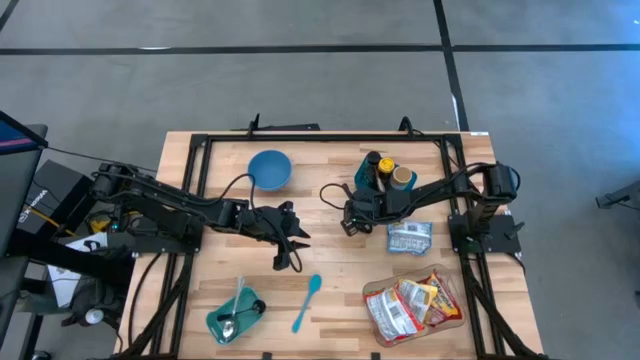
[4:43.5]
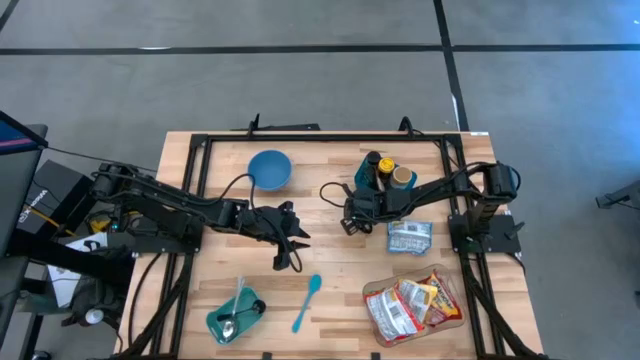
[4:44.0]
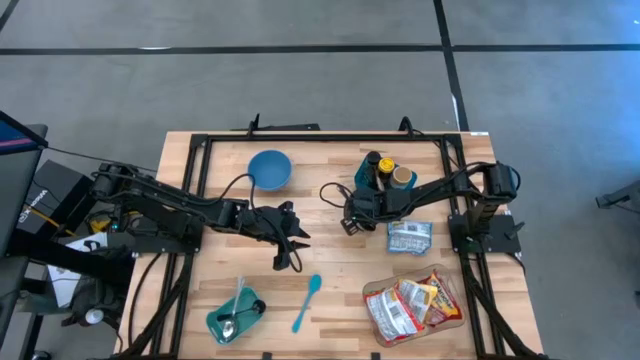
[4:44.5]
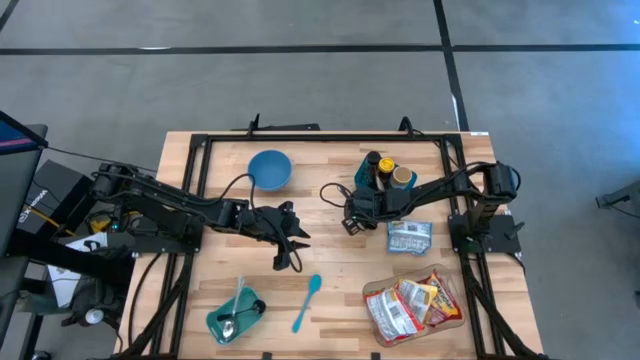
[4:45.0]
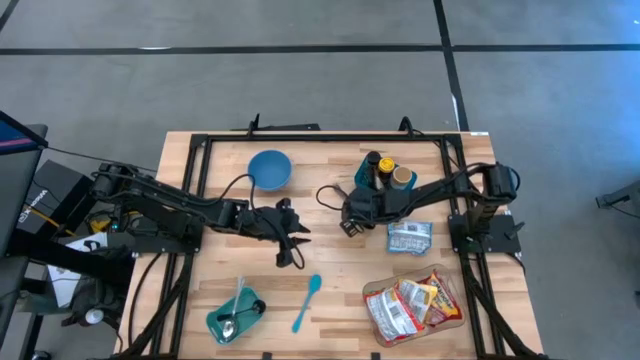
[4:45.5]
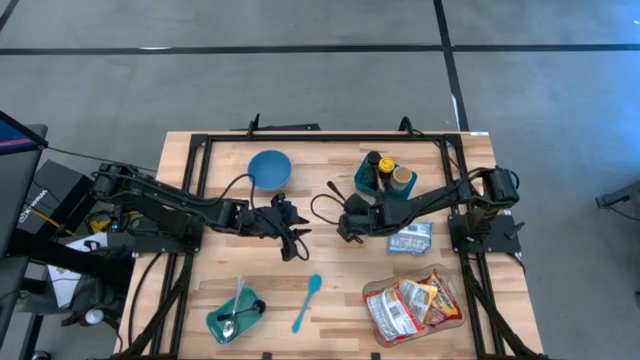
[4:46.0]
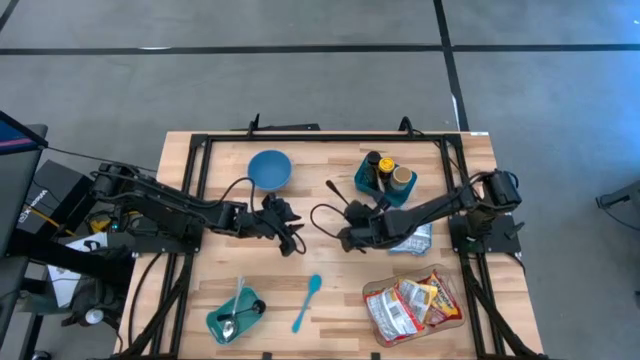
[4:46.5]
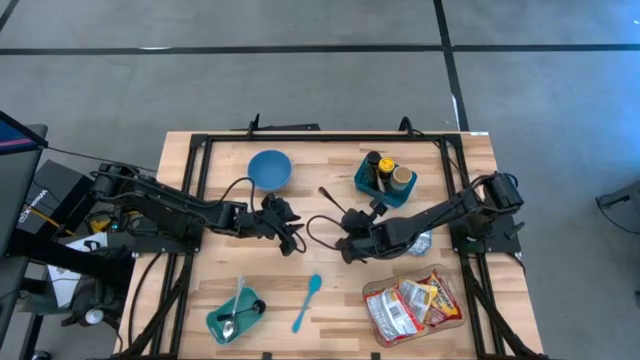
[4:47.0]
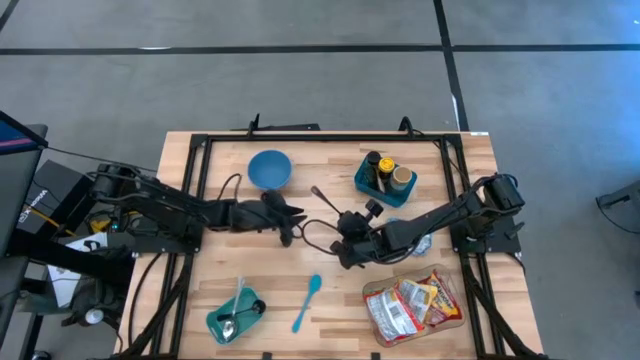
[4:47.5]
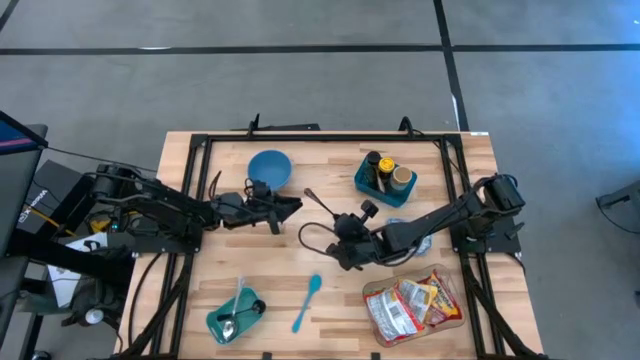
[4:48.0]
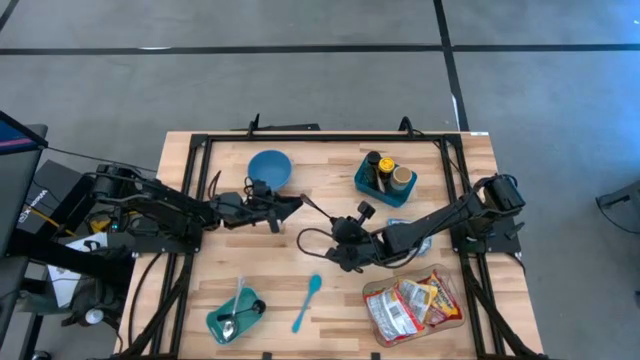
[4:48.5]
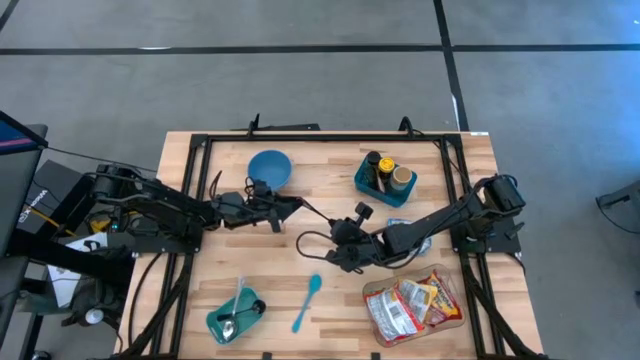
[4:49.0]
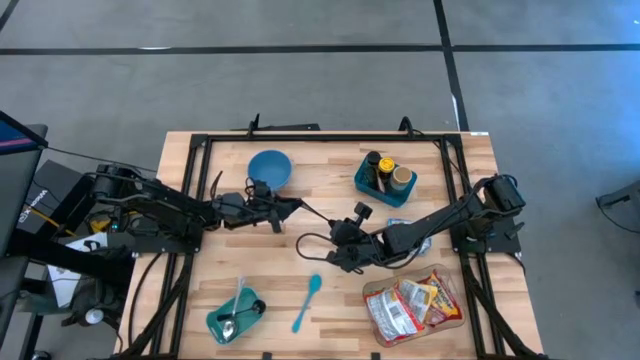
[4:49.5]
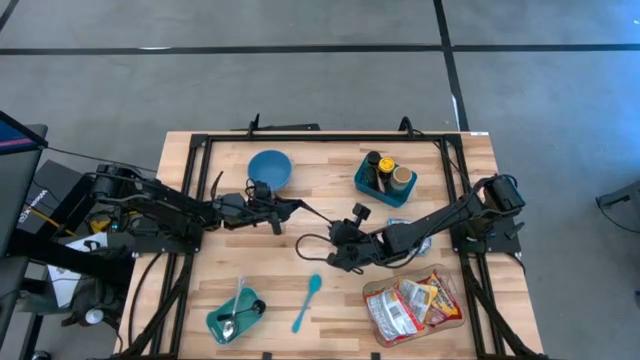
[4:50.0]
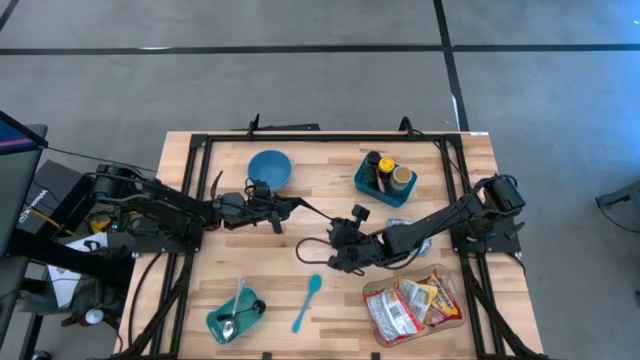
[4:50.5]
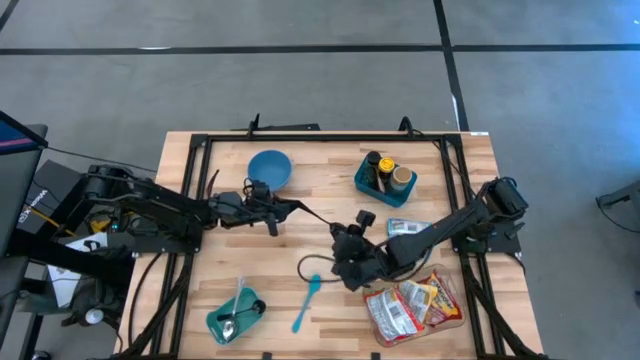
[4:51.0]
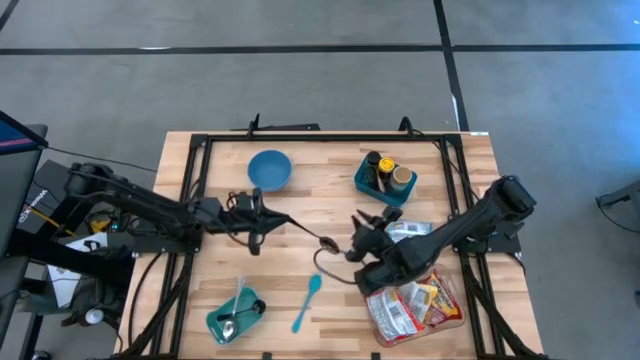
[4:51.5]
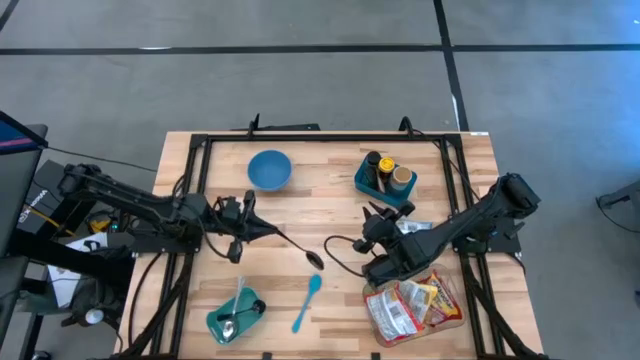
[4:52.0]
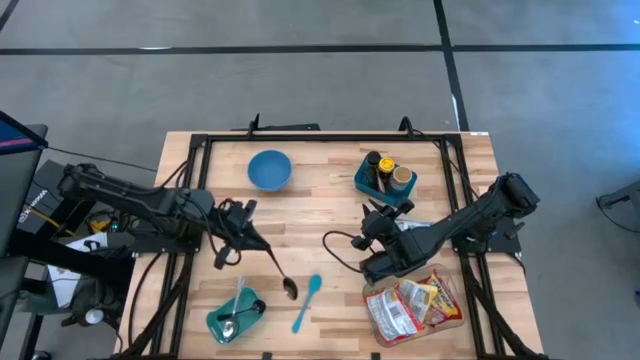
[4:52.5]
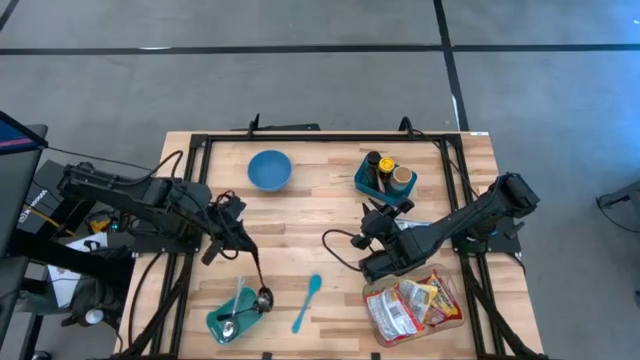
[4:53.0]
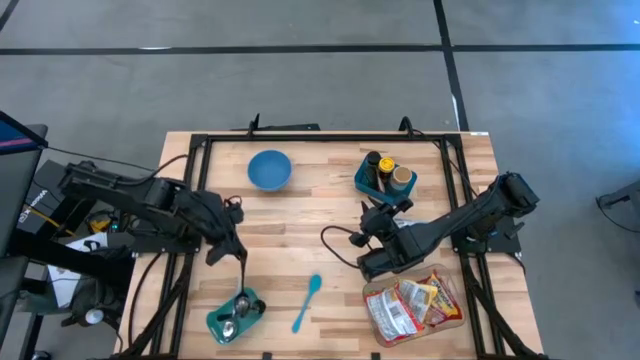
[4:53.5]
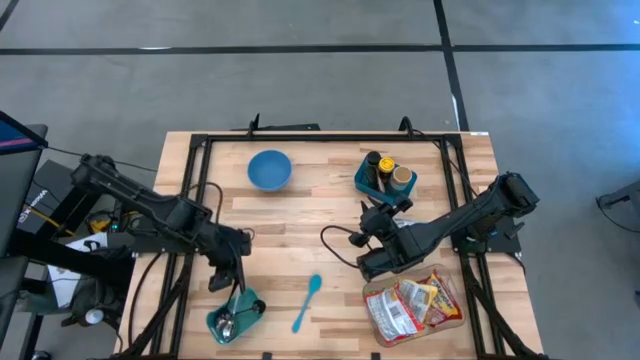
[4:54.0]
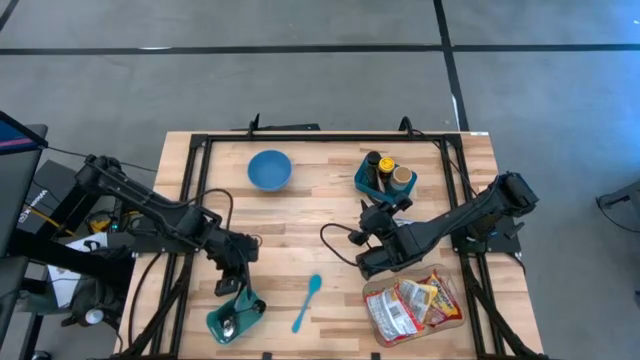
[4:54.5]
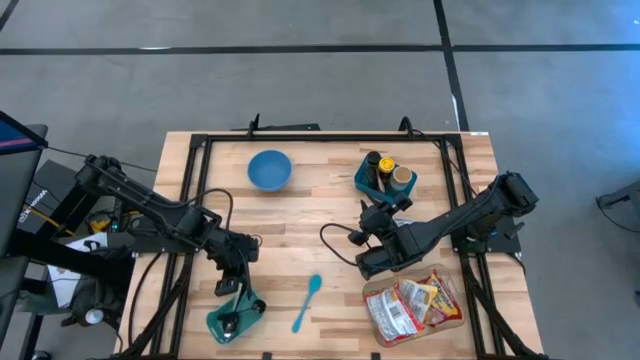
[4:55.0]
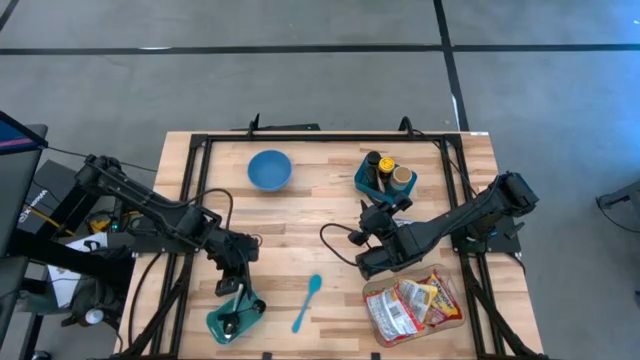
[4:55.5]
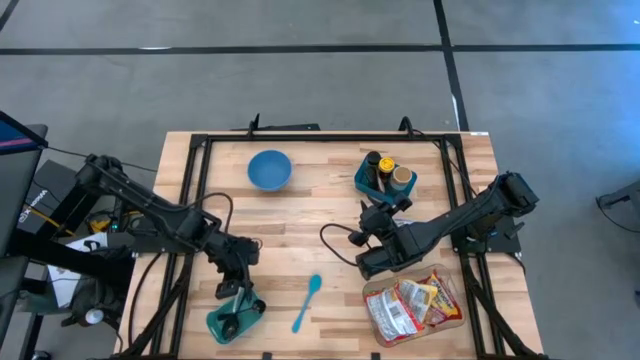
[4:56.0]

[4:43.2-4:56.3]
Task: Pick & Place Food Item
Put the black spoon into the green bin

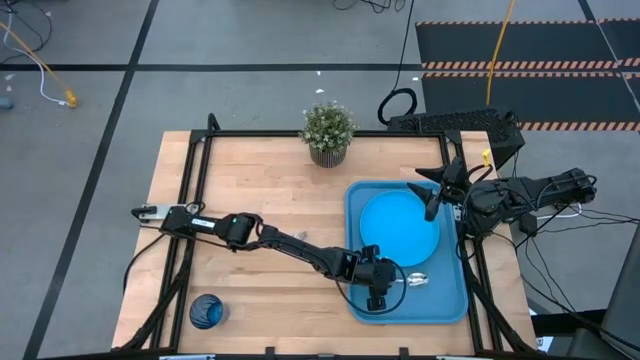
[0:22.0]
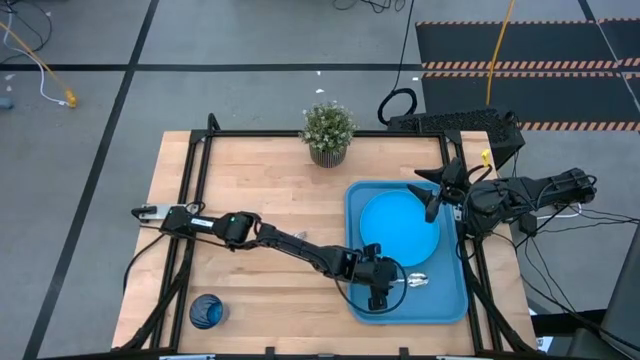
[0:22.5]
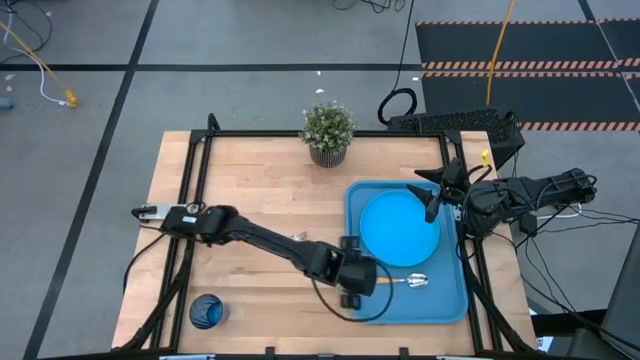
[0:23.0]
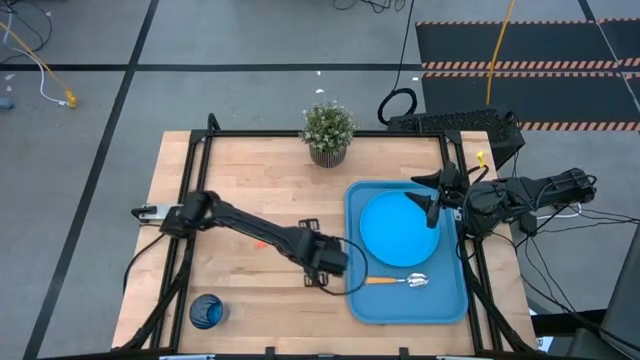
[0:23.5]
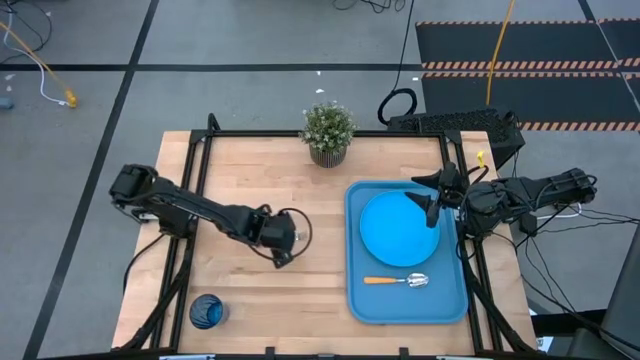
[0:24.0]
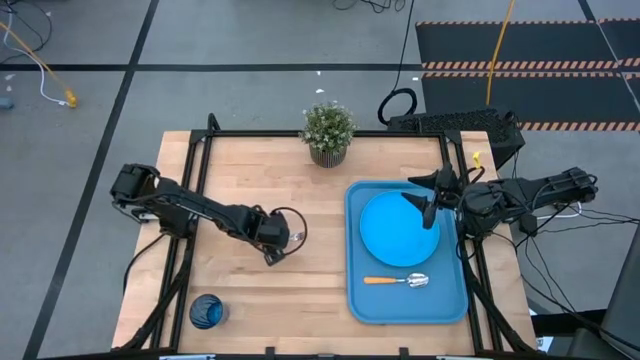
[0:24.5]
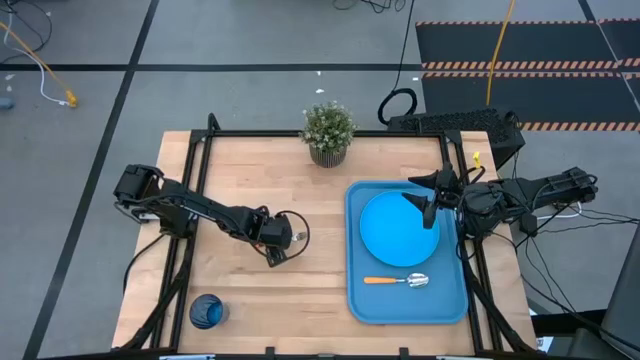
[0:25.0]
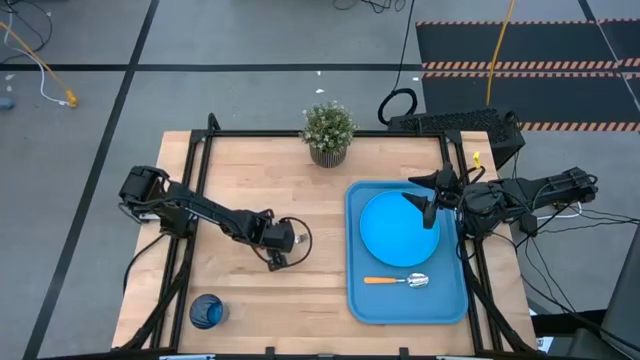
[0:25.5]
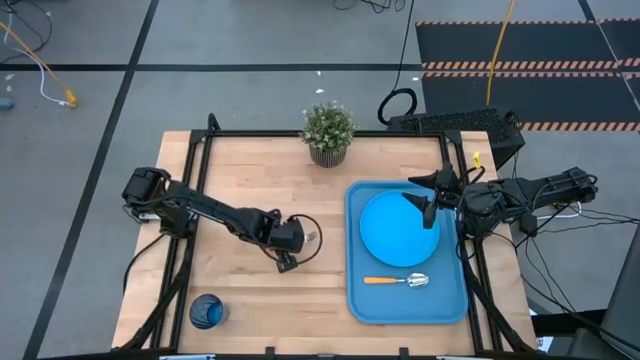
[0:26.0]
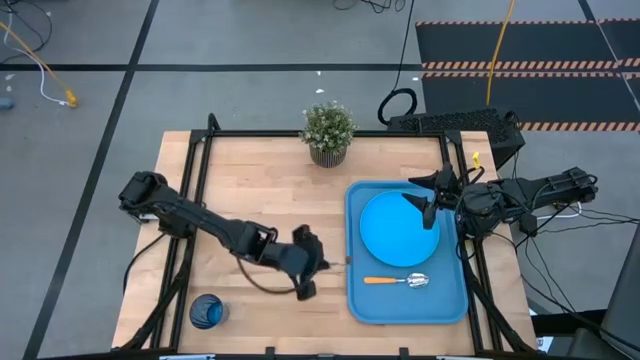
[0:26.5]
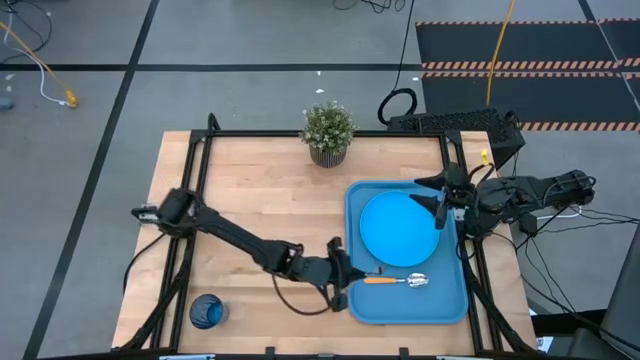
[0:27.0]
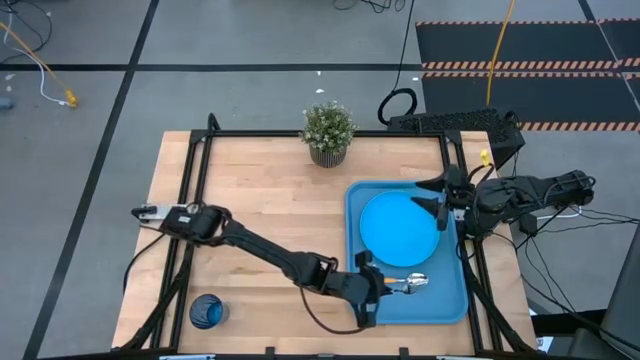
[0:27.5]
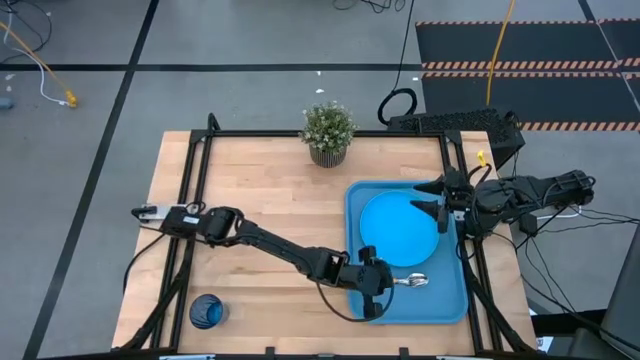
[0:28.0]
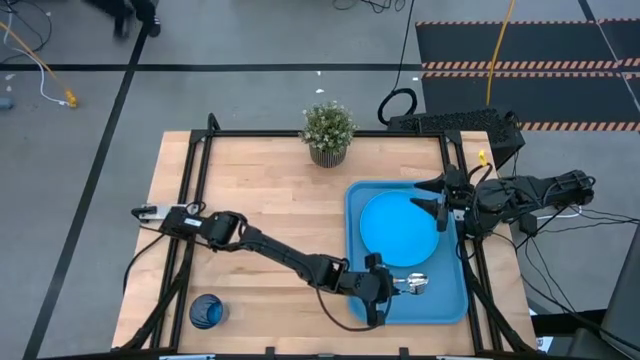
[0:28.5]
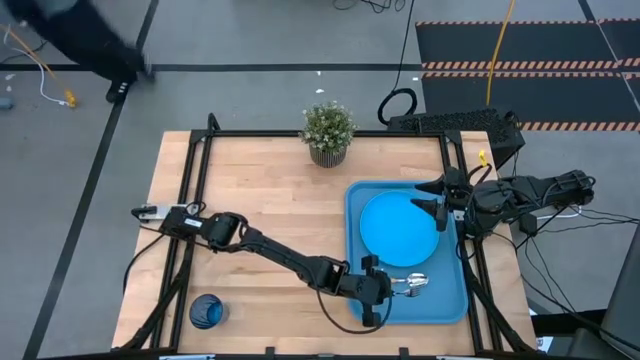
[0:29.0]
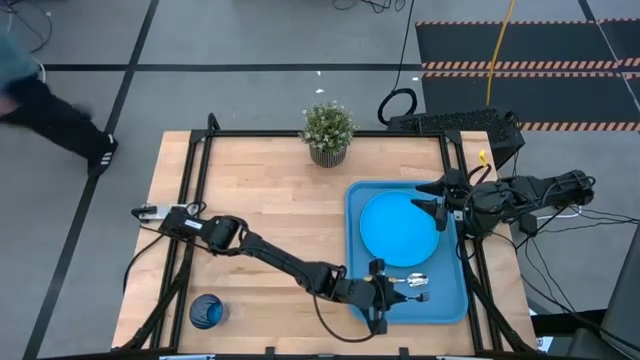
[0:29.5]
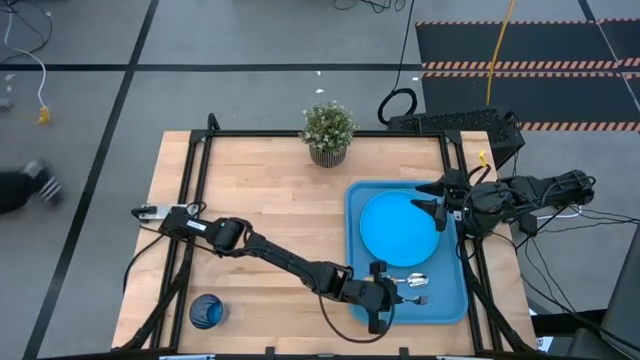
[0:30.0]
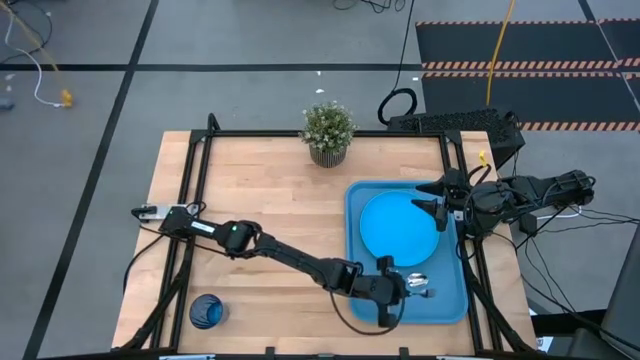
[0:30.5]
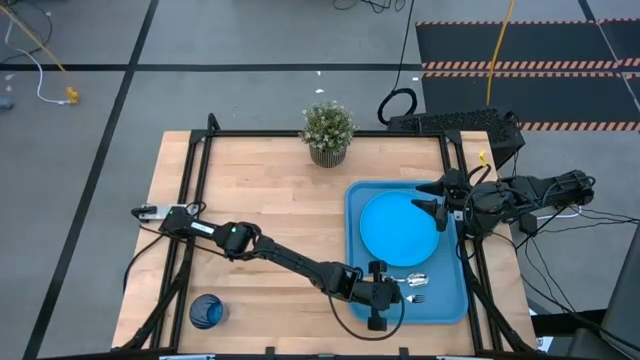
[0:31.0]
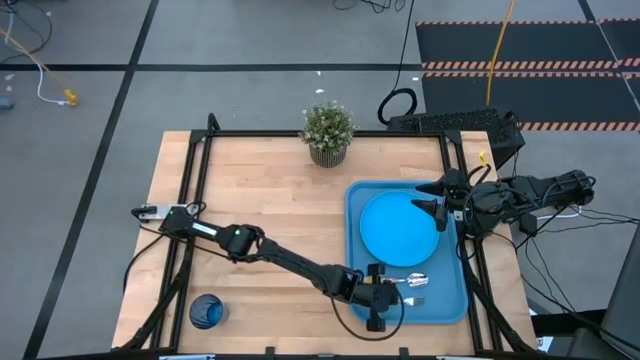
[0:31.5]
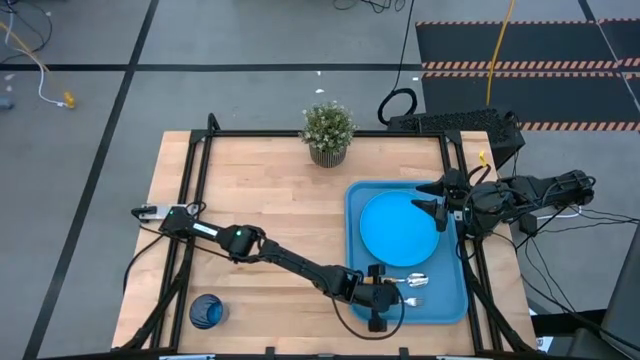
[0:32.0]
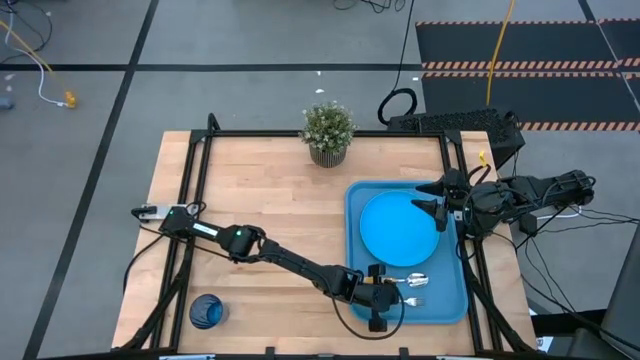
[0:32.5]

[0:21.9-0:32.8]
Task: Pick and place plate/cup/fork/spoon on tray
Put the orange fork on the bottom of the orange spoon on the blue tray
